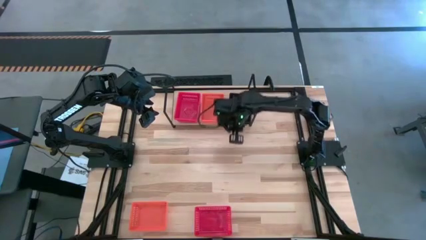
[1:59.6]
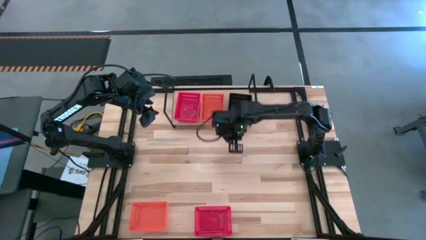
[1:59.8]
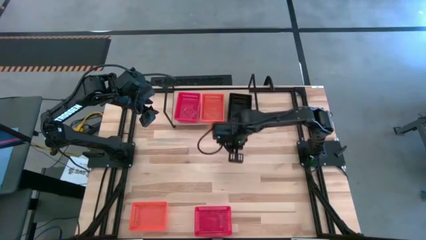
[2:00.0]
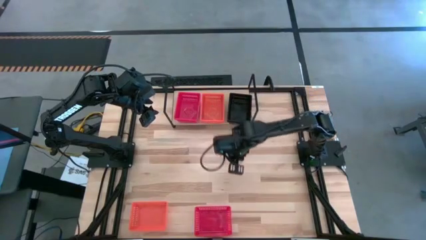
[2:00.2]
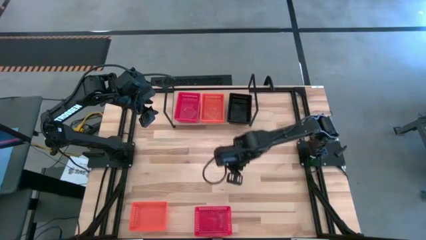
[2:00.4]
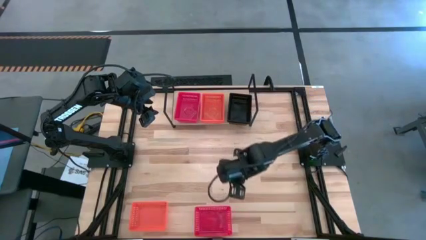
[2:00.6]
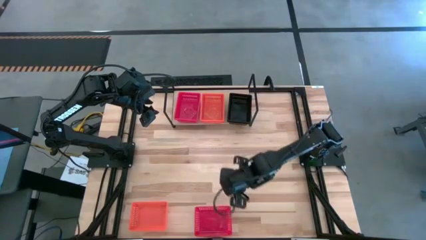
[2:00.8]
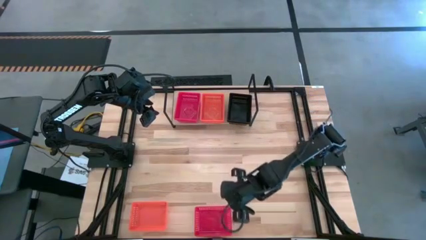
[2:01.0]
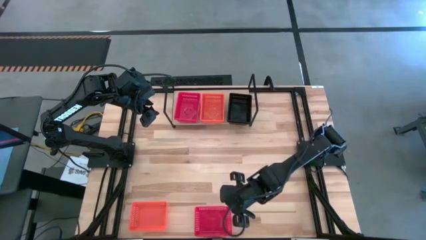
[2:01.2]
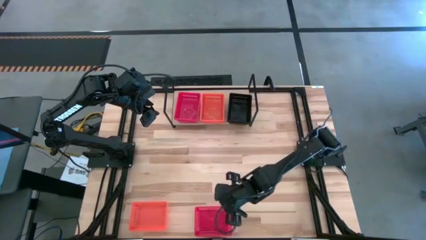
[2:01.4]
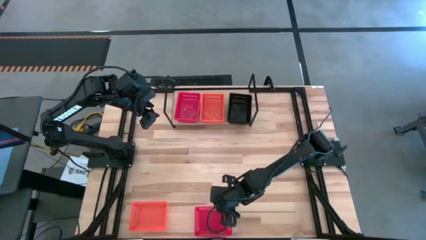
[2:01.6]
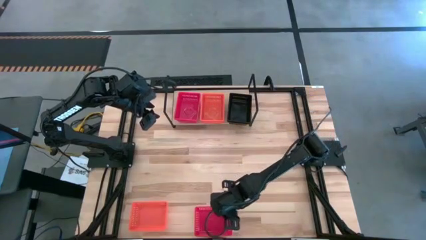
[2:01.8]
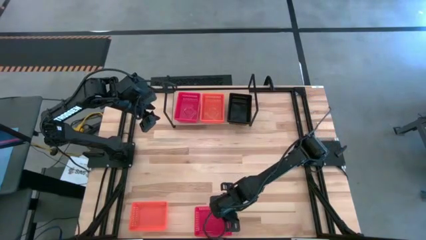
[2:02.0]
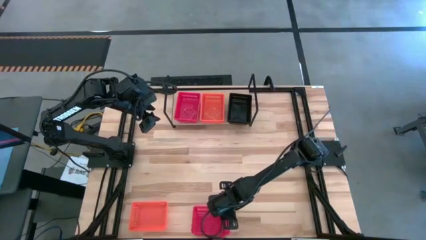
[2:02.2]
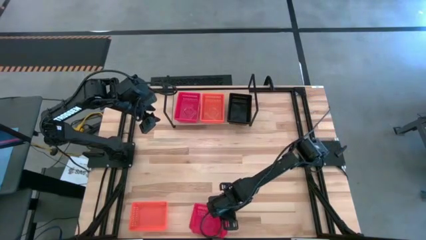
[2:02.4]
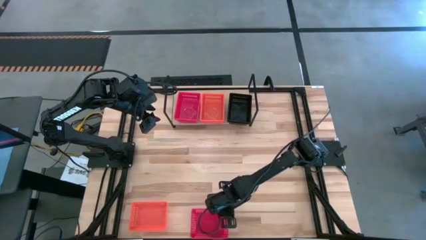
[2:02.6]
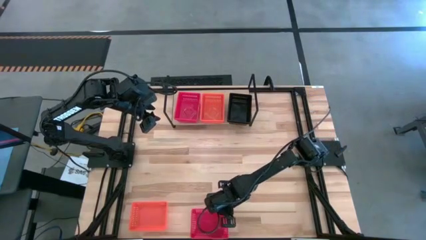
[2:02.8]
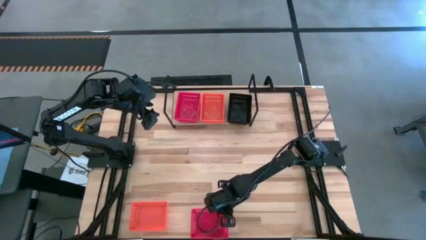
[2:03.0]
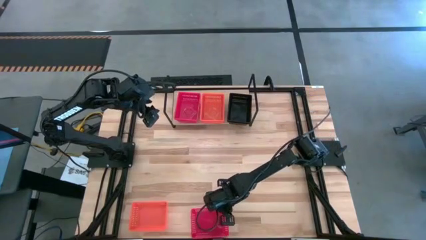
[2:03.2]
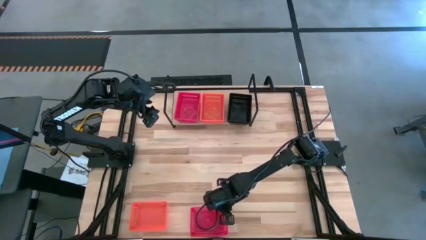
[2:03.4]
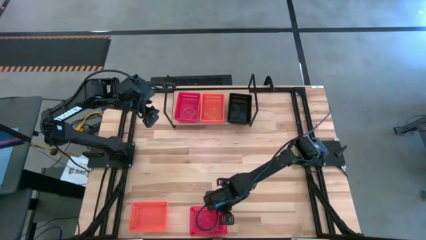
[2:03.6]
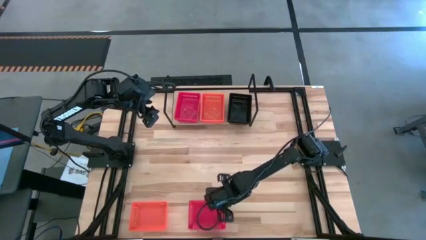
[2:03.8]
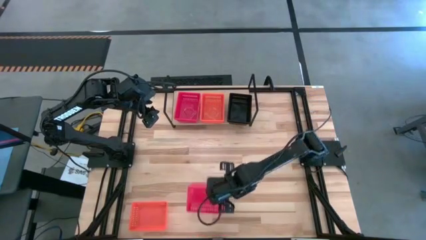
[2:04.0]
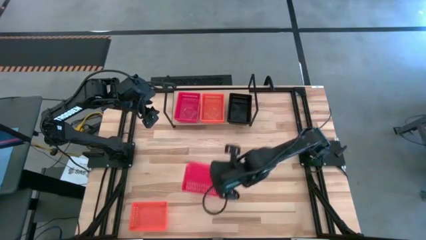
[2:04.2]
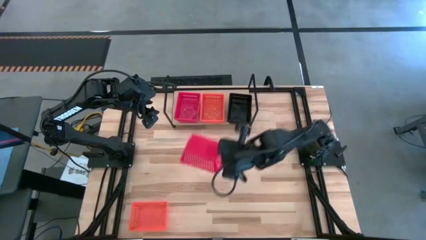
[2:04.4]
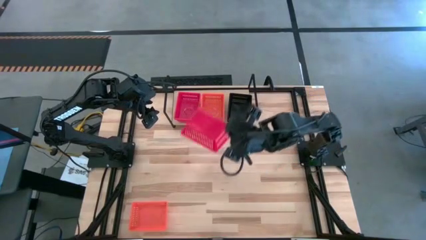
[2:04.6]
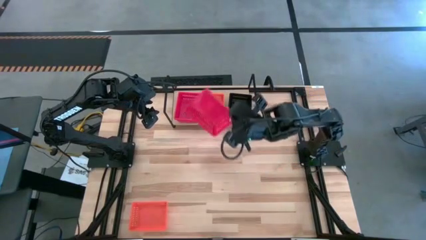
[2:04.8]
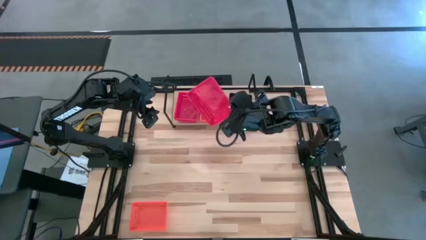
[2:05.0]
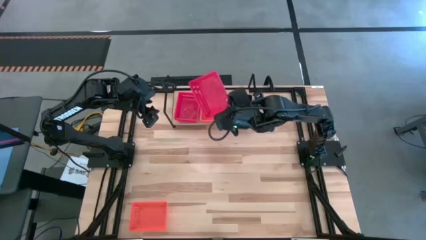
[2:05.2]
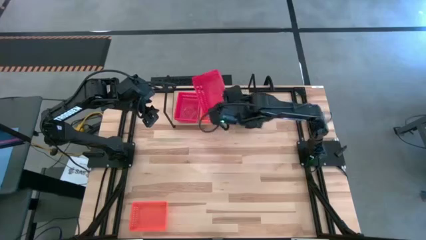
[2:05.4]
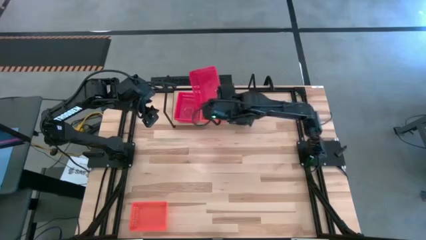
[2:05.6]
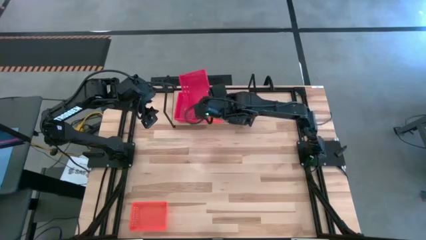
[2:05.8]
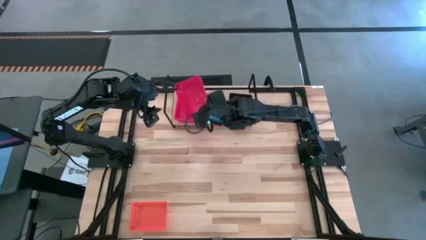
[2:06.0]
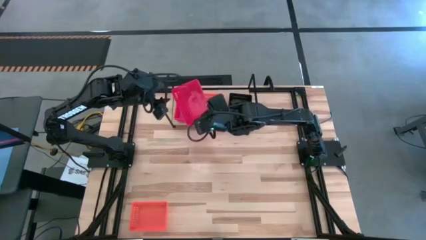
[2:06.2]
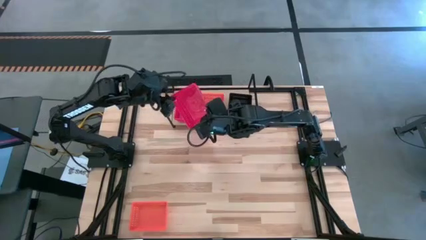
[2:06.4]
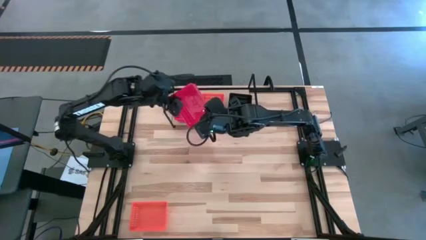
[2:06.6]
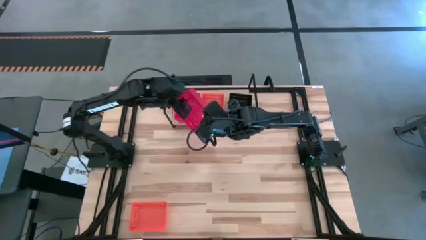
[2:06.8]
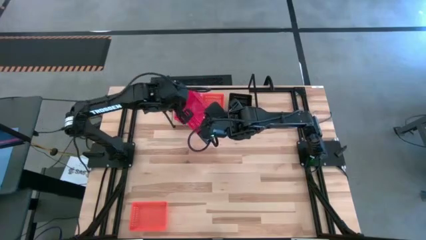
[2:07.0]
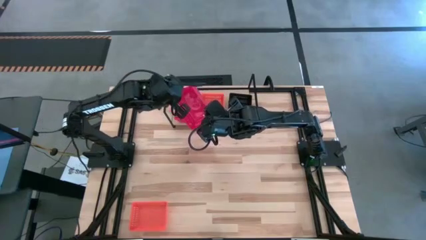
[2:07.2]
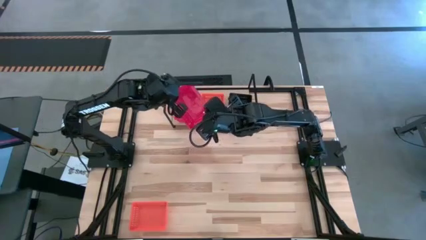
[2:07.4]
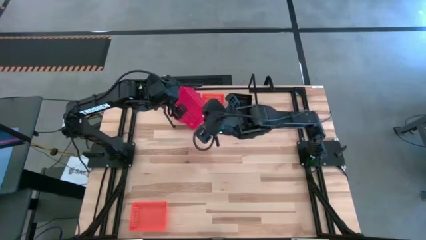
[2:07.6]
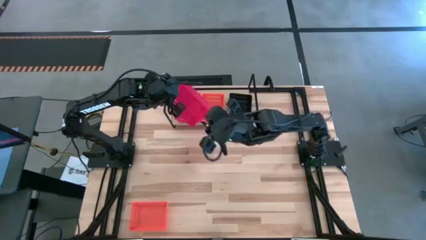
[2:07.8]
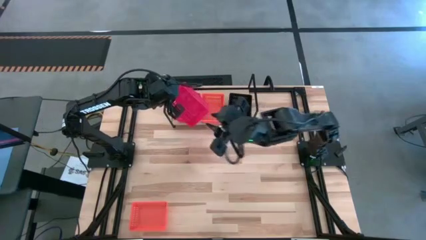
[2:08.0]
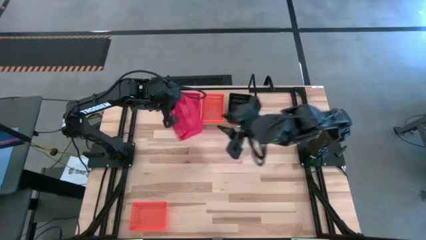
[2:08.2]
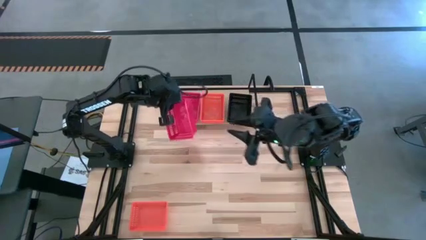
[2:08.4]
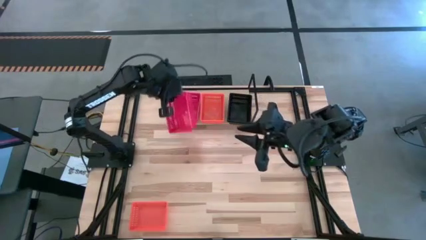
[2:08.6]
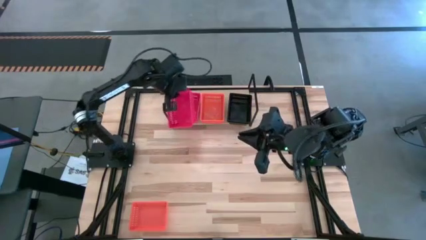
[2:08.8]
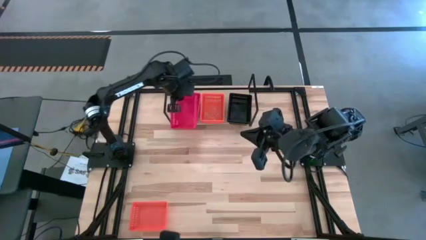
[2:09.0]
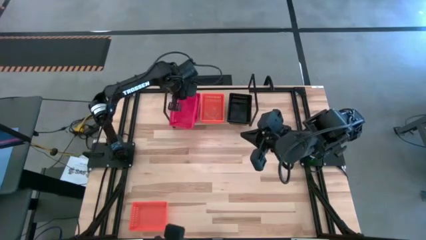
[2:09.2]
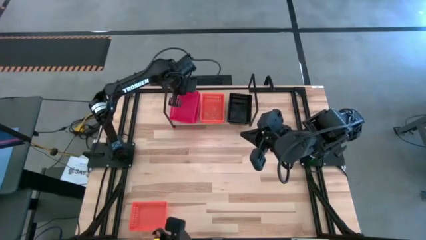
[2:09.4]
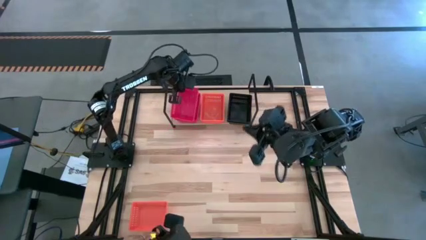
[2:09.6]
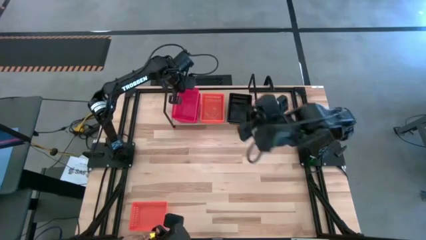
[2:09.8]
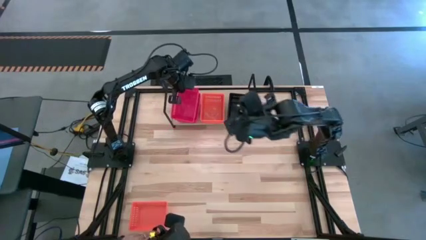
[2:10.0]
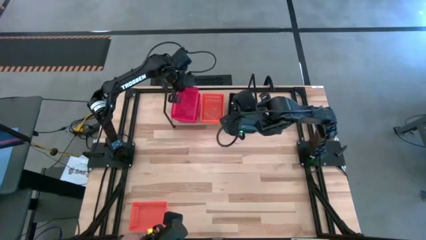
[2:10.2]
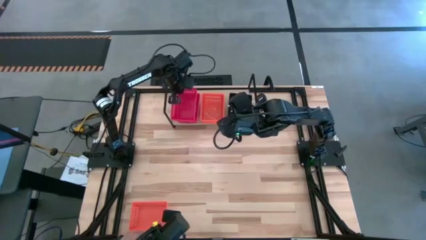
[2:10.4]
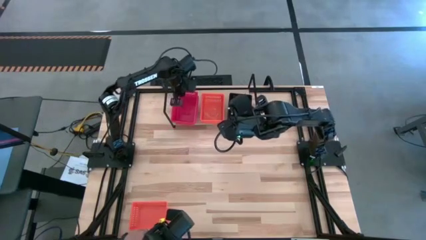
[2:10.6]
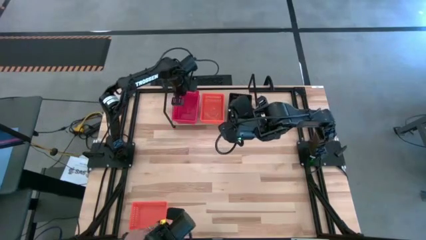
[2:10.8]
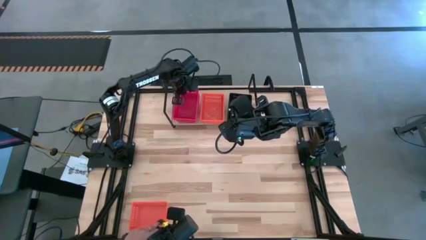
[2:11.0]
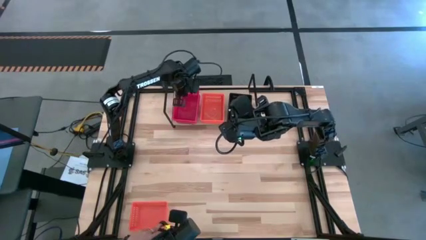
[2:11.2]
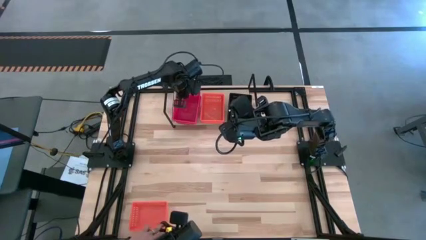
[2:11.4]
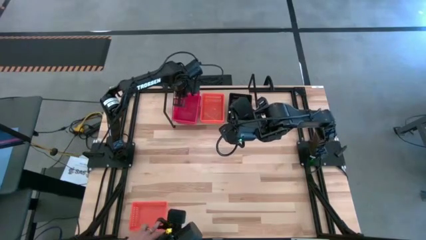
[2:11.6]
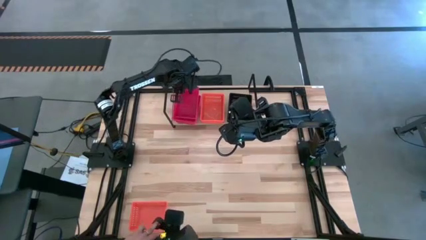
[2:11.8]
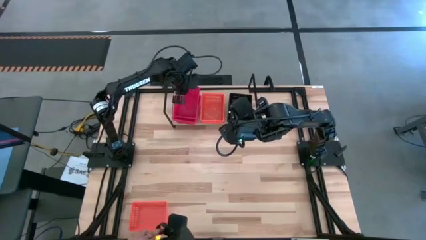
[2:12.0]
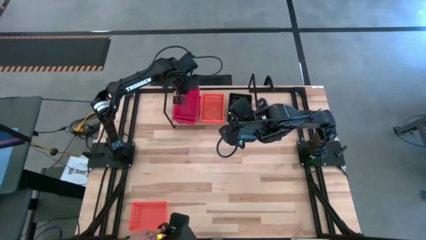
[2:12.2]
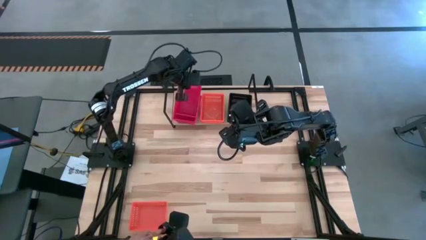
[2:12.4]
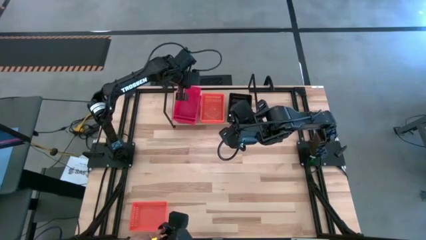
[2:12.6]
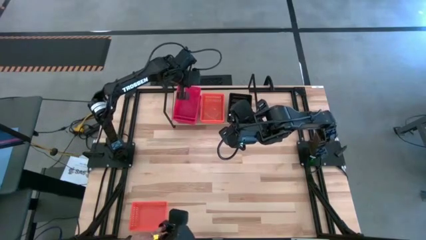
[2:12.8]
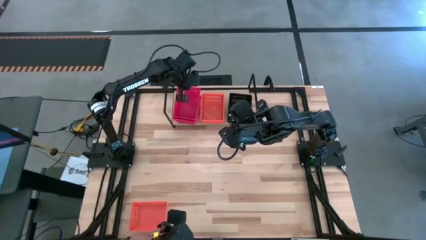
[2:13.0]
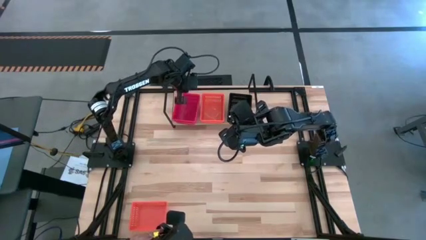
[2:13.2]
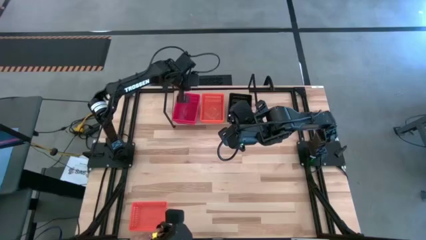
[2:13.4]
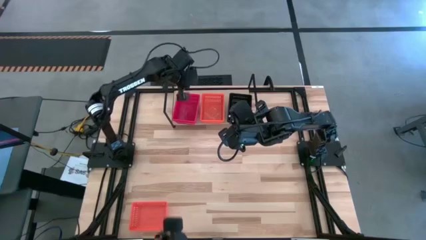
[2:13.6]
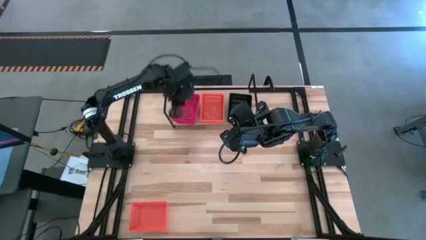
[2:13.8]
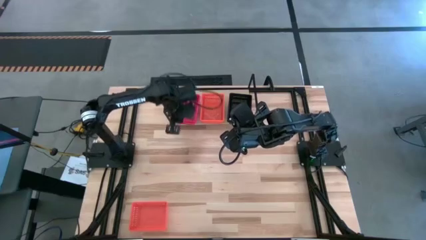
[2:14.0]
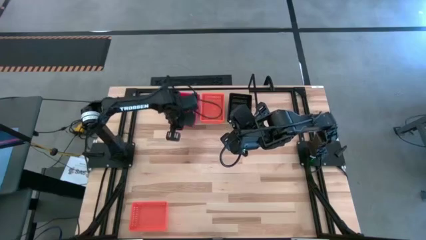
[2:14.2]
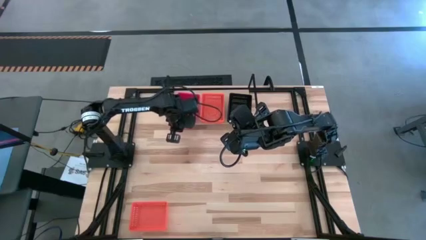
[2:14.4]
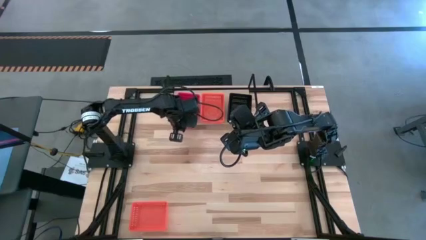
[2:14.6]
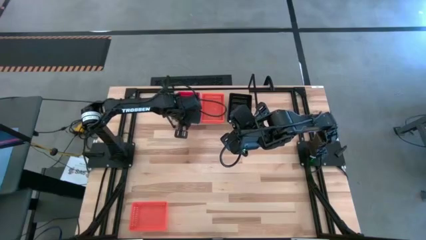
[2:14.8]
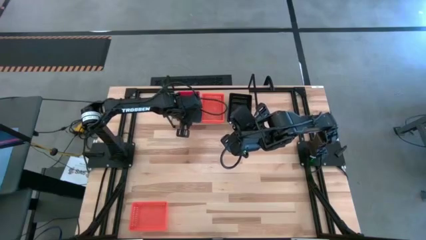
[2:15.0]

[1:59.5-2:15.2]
Task: Stack baskets on shelf by color
Stack the red bin on top of the red bin on the shelf
